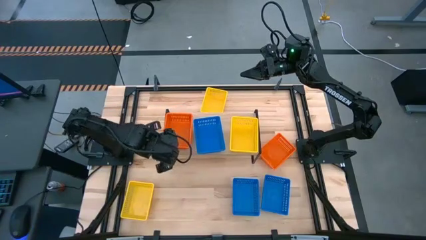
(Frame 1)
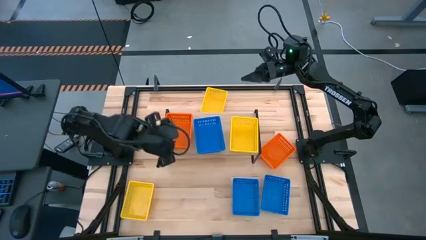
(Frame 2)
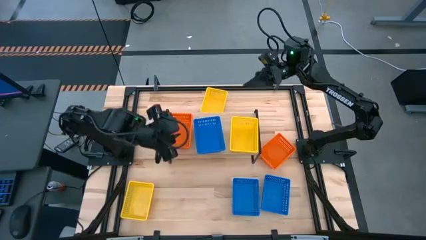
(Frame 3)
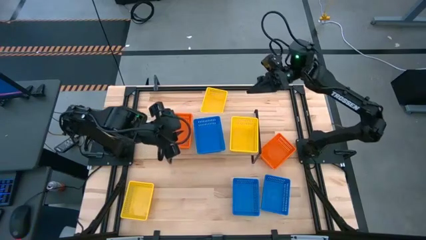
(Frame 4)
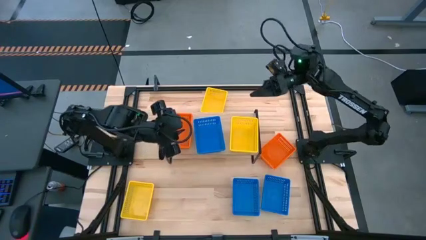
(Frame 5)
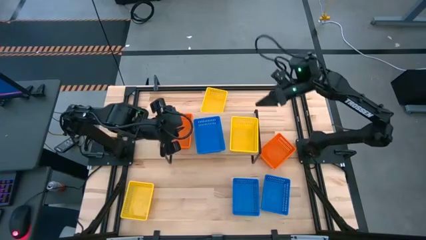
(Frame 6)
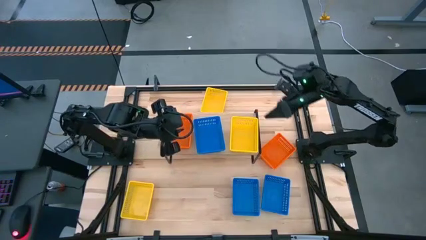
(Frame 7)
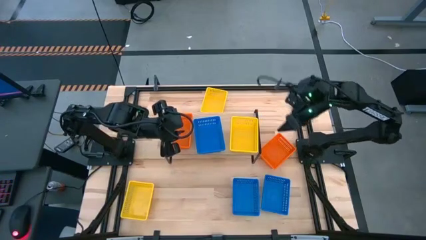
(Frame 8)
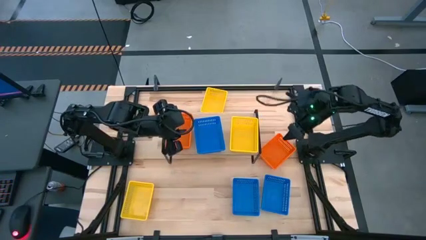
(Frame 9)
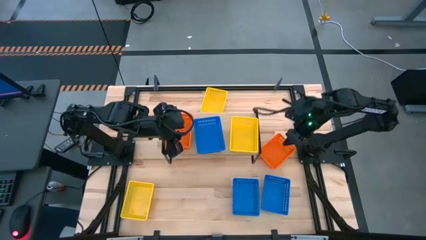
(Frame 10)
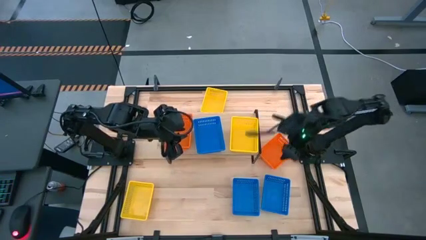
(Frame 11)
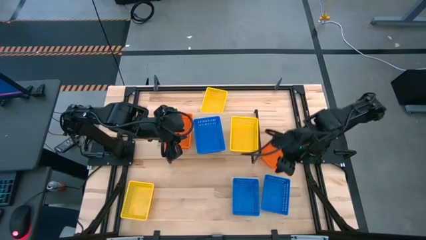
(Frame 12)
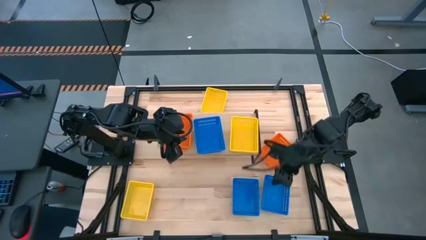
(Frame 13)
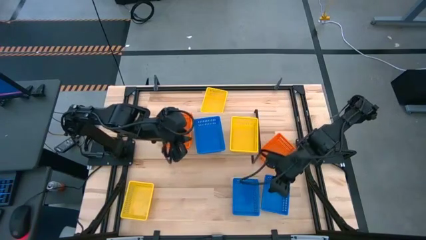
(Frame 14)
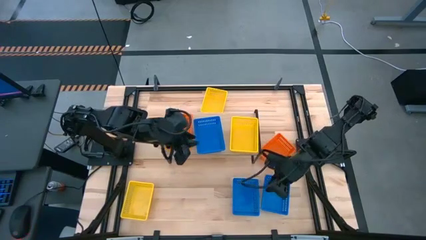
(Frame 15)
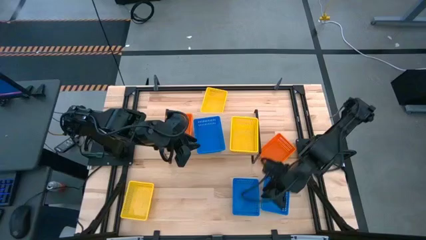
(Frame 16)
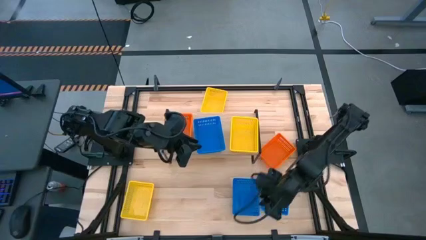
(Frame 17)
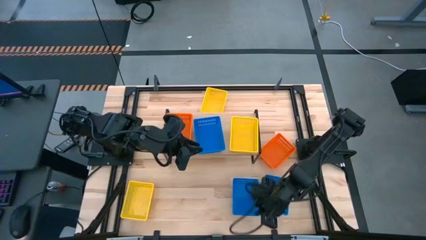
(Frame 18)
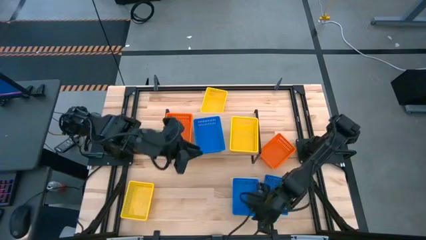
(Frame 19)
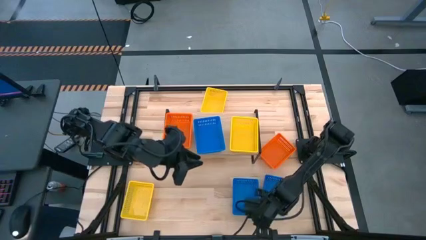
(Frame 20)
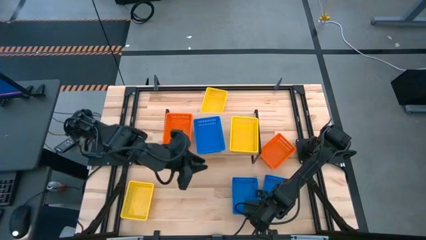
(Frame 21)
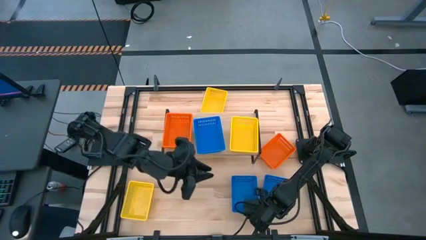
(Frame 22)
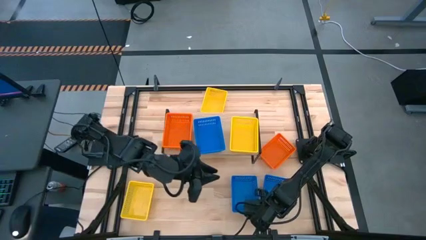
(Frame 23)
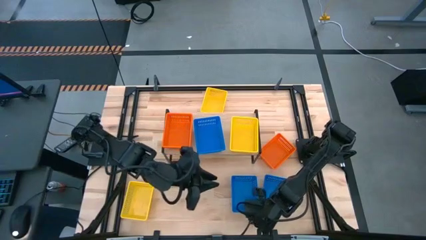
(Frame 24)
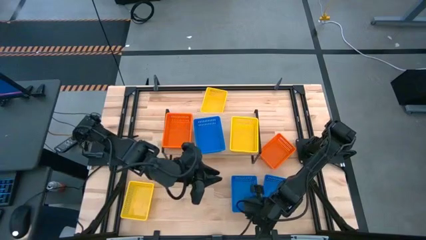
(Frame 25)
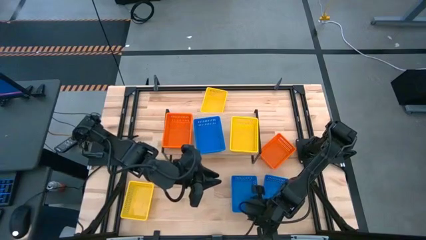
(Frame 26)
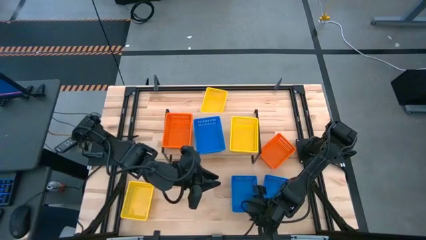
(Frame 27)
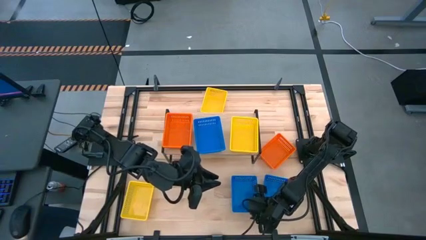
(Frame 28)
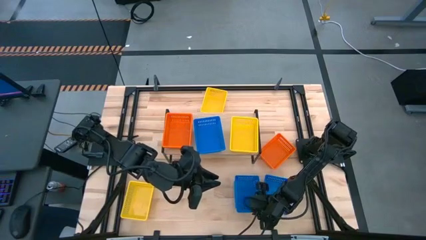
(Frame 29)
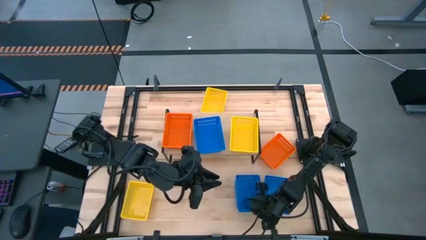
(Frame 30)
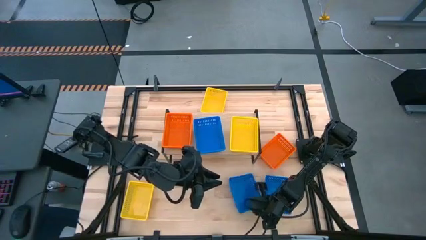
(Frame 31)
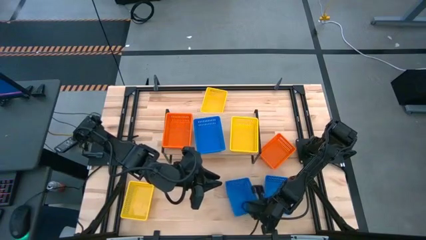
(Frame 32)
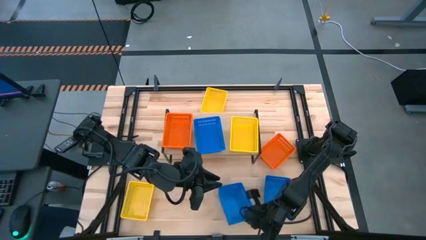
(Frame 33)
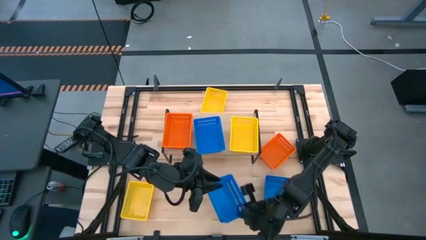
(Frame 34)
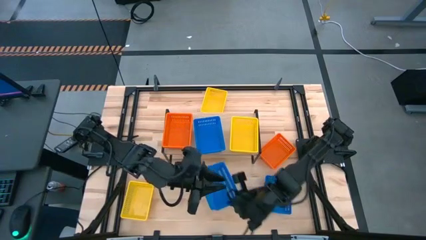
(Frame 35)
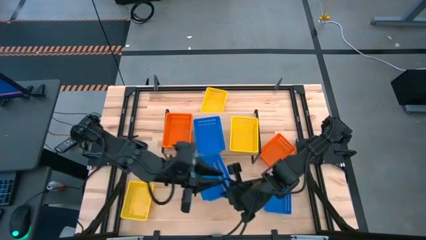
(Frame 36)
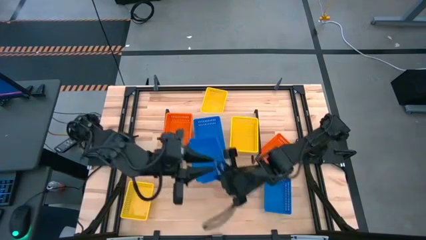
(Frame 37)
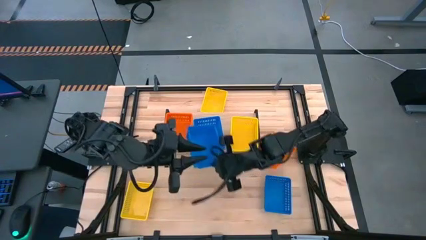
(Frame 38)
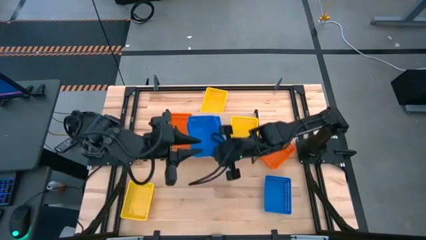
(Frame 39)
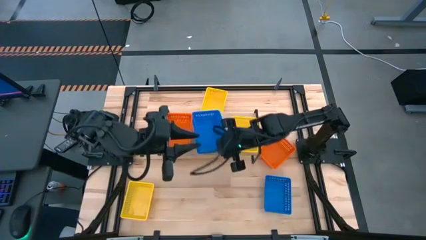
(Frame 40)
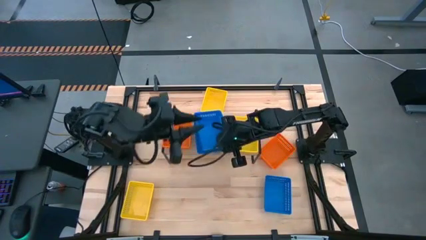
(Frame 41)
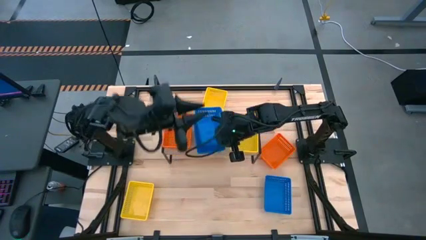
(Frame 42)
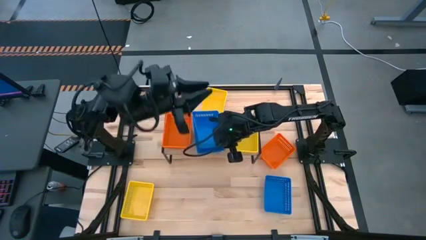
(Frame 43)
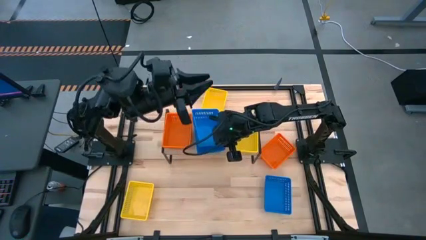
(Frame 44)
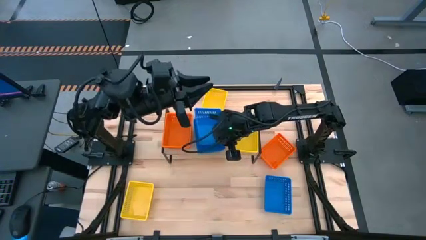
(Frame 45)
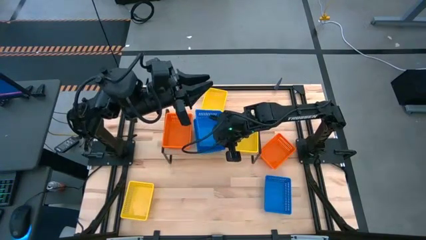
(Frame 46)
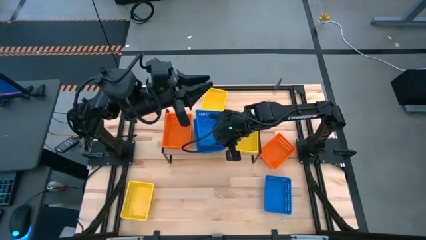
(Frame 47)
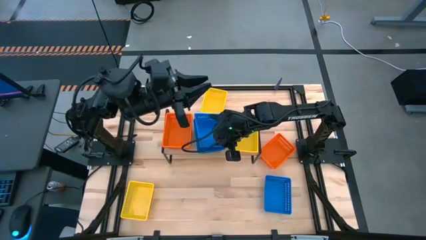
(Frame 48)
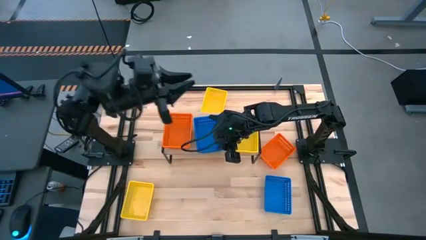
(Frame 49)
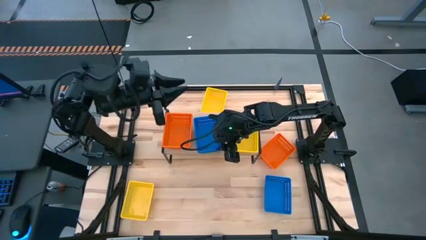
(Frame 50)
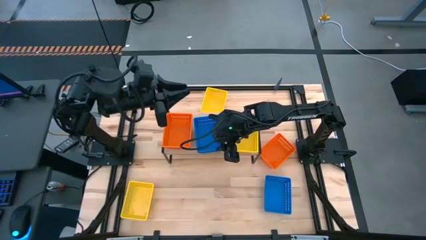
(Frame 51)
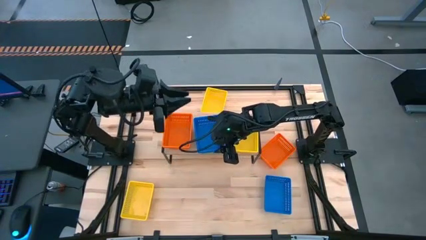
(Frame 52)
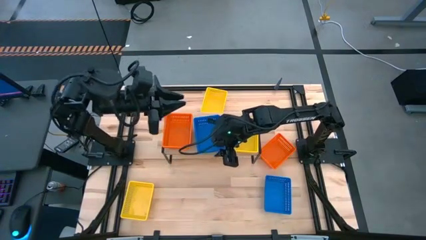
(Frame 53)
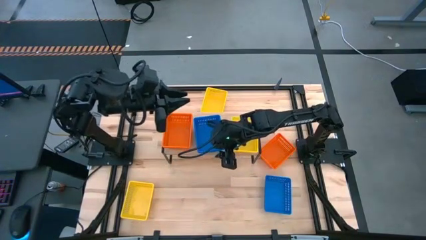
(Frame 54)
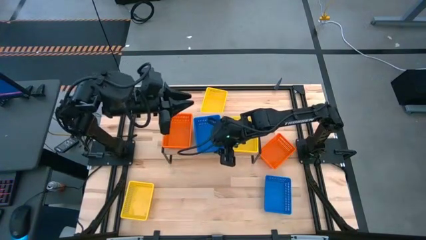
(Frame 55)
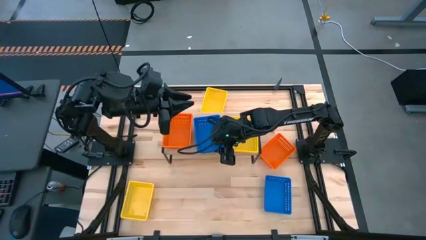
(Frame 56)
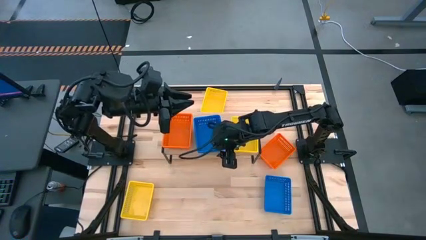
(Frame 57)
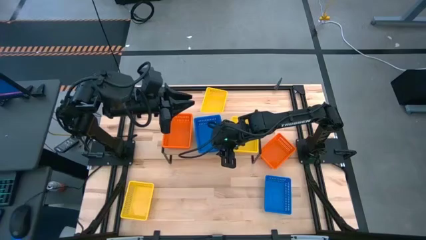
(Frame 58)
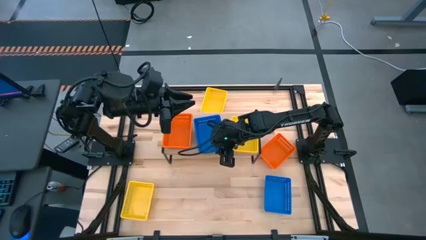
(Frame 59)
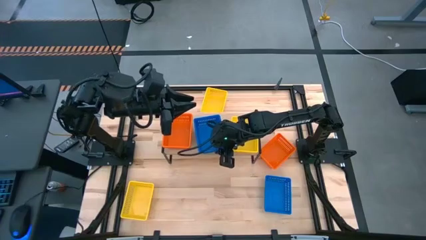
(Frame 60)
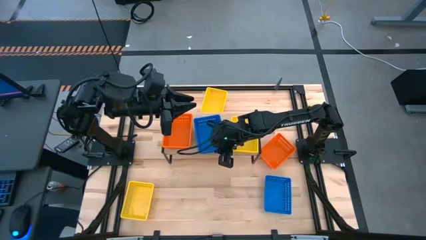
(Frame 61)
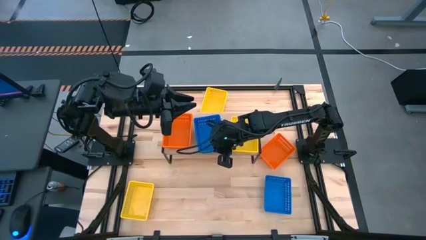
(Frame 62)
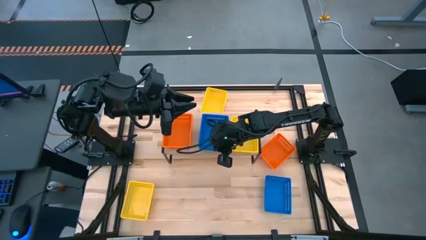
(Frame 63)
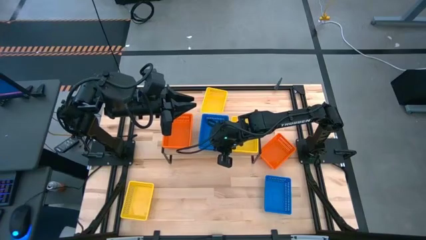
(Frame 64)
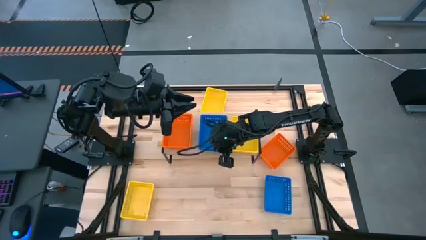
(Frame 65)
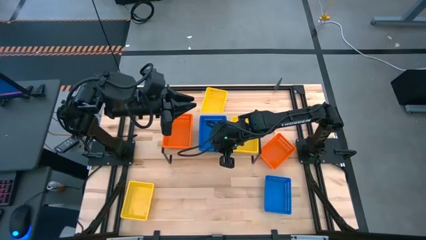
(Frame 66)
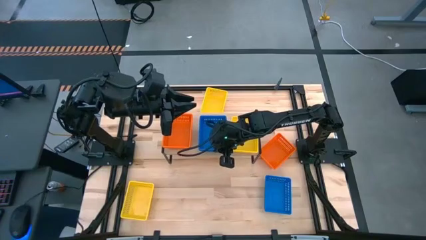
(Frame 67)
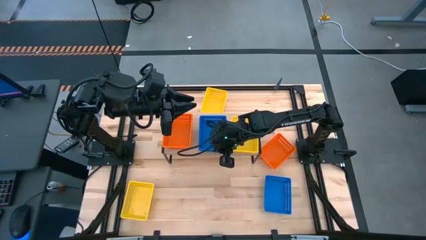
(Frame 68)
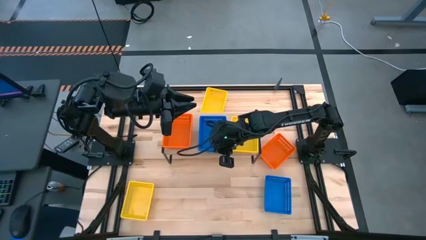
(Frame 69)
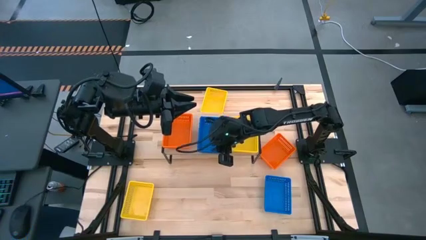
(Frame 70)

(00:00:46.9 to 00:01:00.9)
Task: Stack baskets on shelf by color
Stack the left blue bin on top of the blue bin on the shelf
